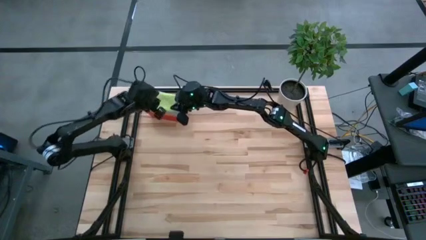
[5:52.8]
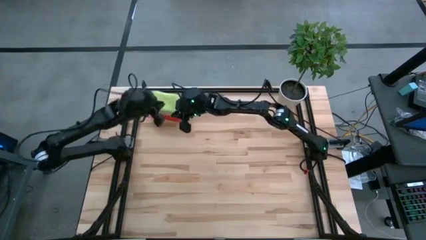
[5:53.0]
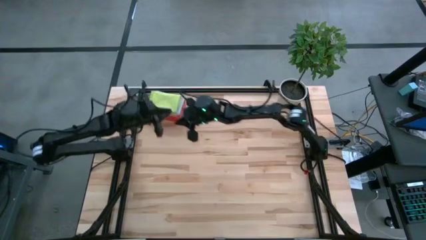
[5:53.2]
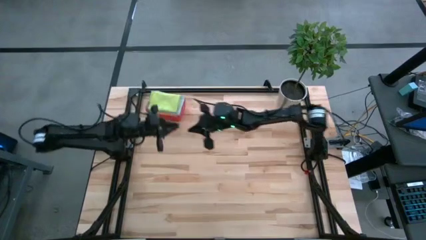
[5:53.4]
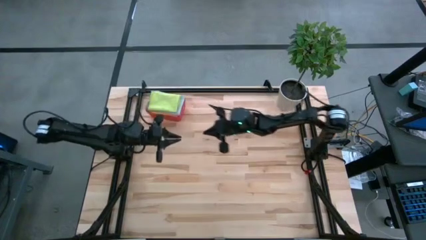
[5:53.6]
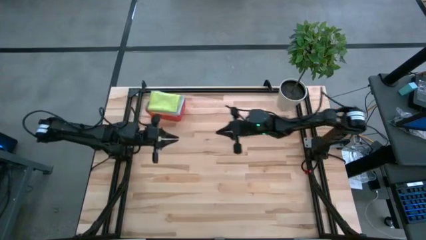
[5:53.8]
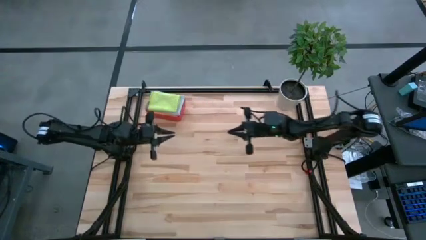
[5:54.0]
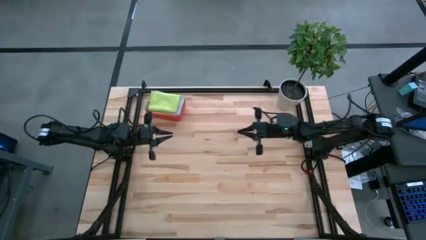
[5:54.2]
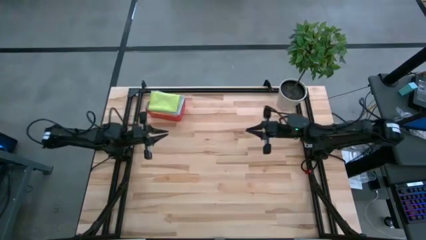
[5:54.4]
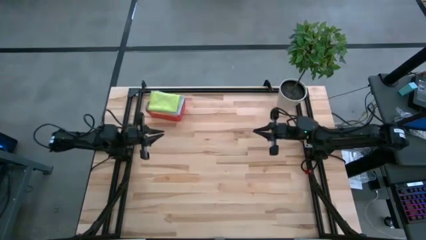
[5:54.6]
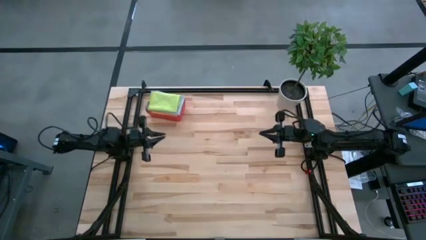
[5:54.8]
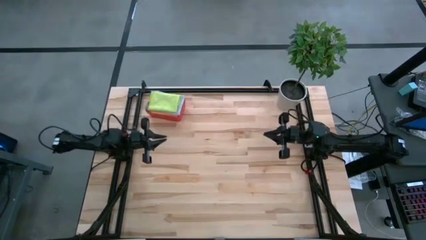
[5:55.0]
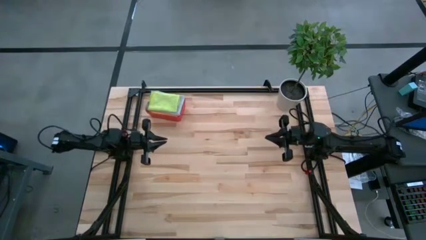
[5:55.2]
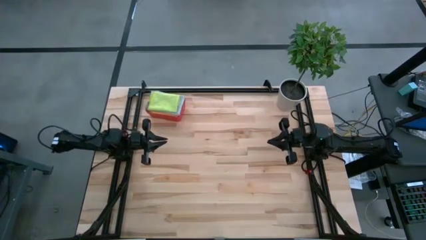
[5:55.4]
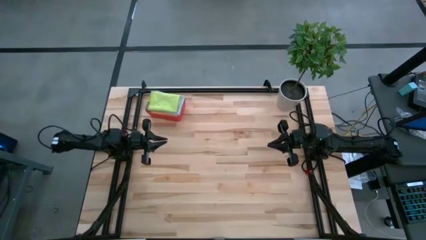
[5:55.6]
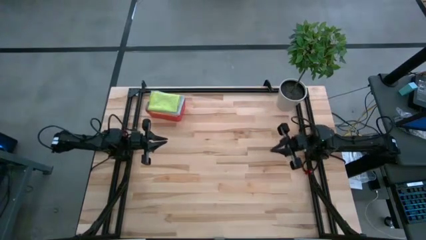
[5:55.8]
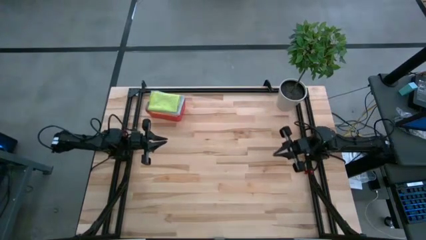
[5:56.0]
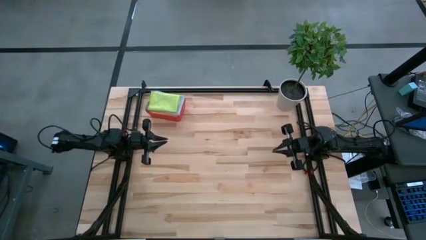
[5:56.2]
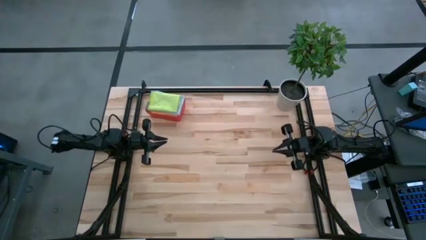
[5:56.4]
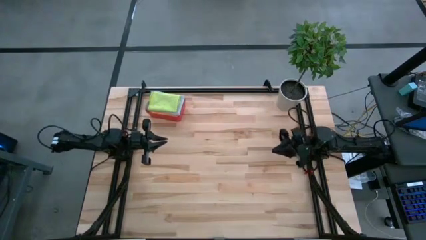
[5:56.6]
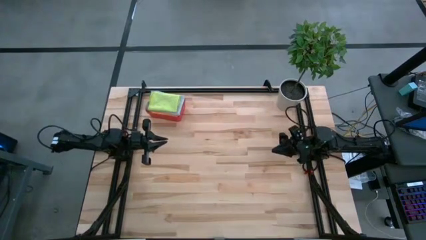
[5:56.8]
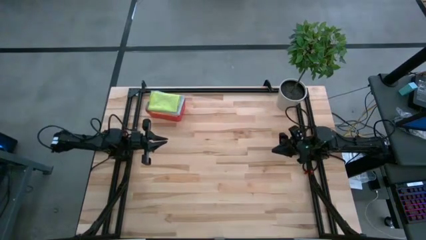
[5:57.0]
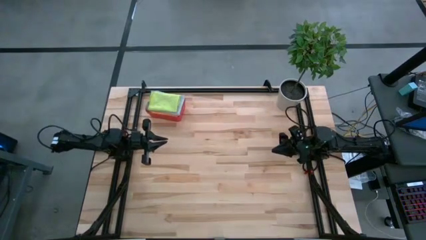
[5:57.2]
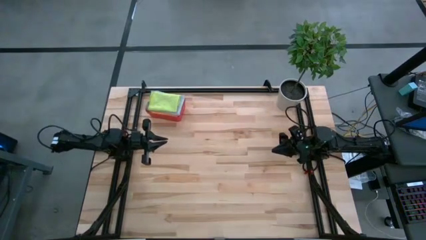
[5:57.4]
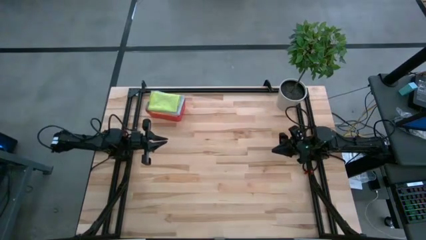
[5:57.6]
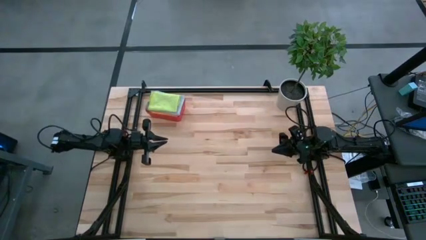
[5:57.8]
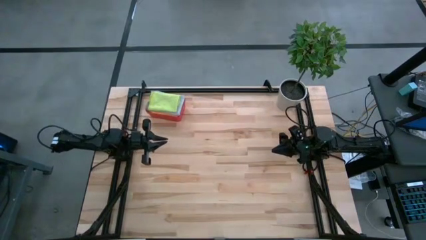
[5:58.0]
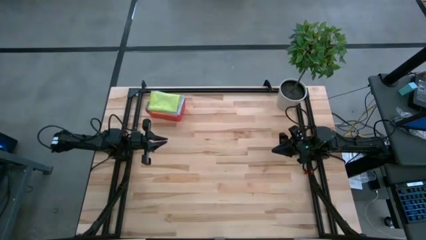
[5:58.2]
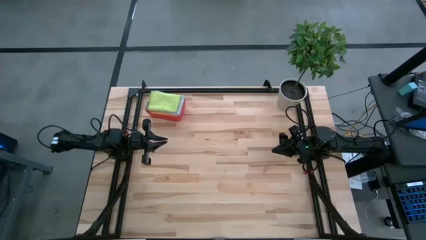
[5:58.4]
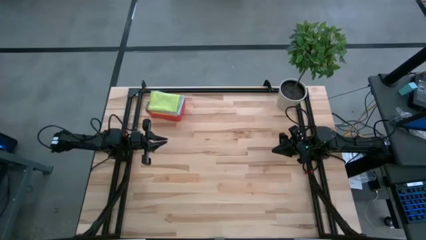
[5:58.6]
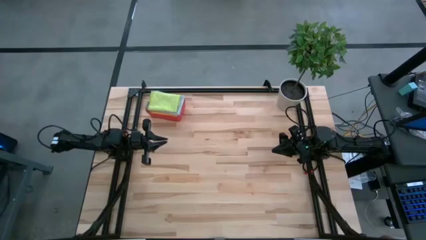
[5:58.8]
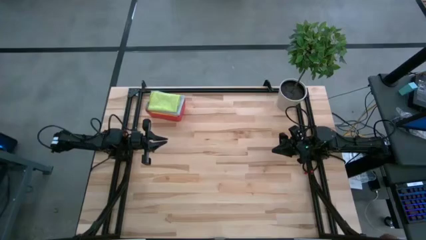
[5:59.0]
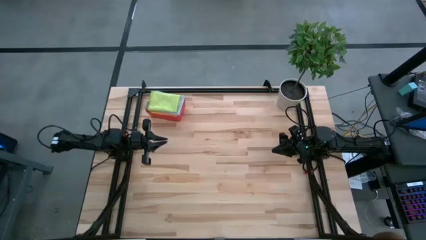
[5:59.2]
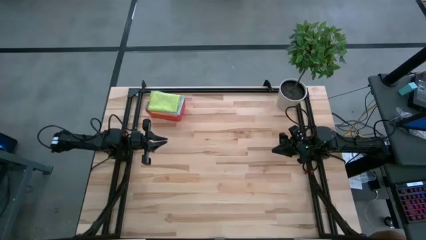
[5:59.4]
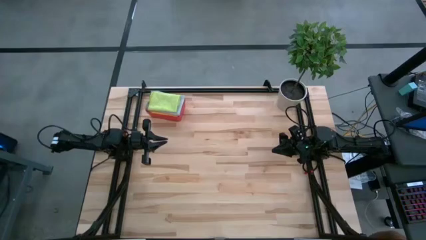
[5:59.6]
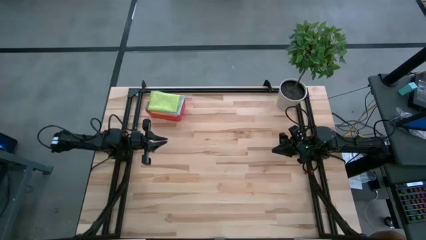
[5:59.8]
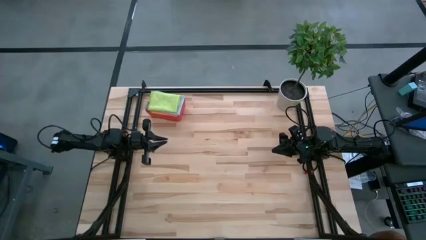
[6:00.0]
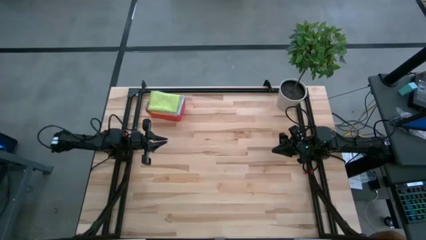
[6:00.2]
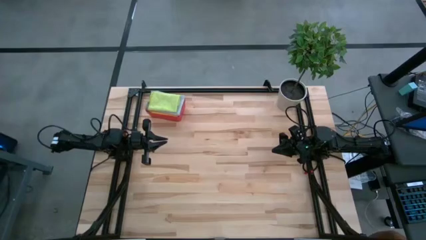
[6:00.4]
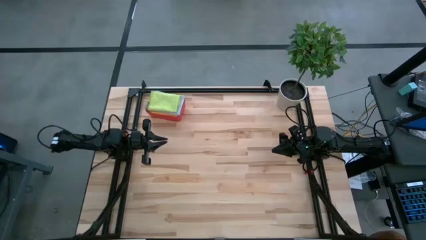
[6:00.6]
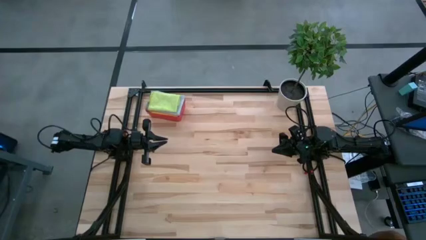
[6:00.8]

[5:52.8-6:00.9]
Task: Fold microfiber towels
Return to Home Position

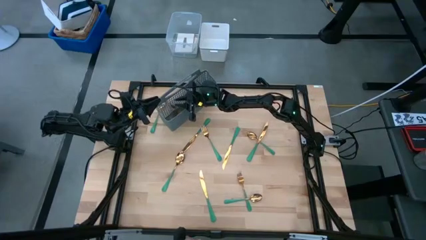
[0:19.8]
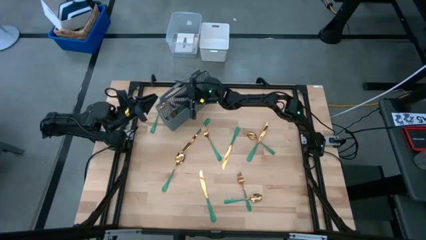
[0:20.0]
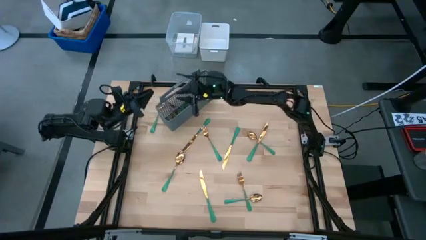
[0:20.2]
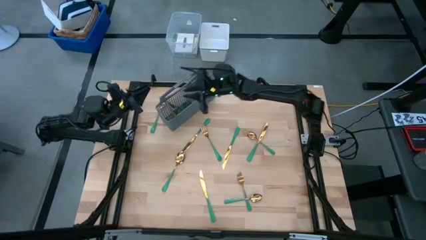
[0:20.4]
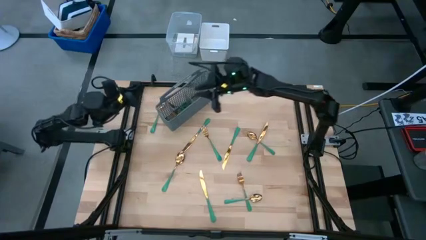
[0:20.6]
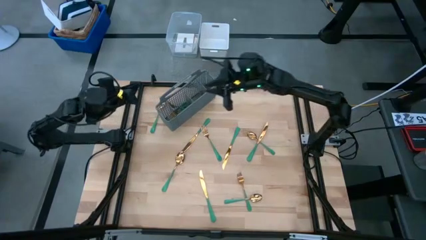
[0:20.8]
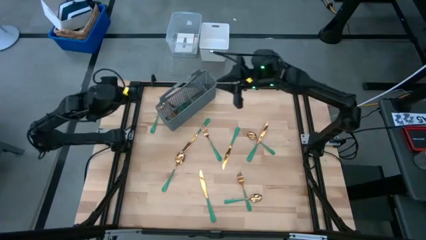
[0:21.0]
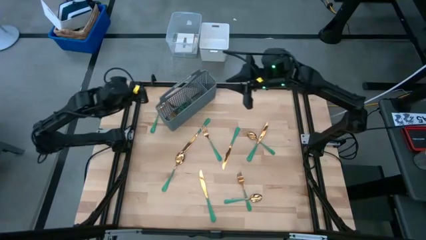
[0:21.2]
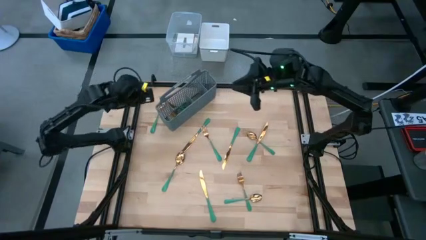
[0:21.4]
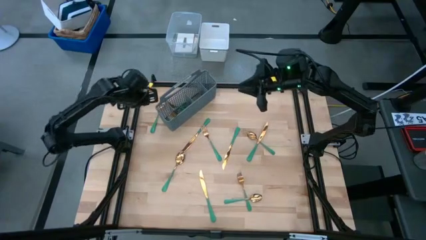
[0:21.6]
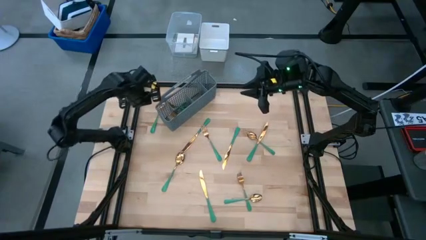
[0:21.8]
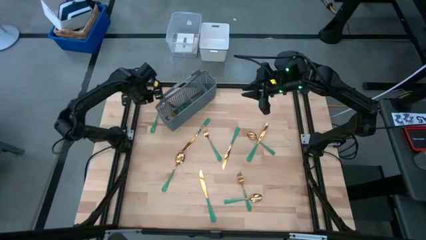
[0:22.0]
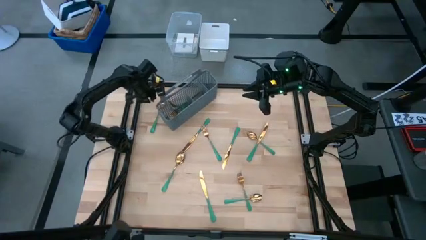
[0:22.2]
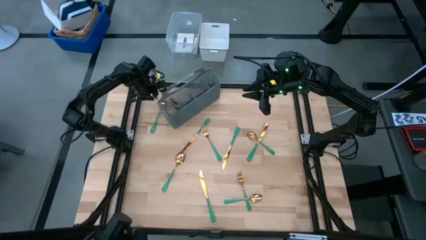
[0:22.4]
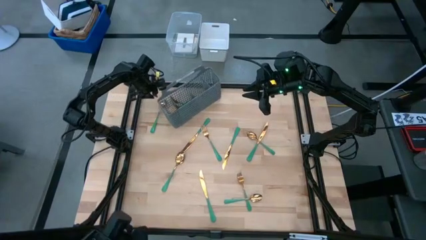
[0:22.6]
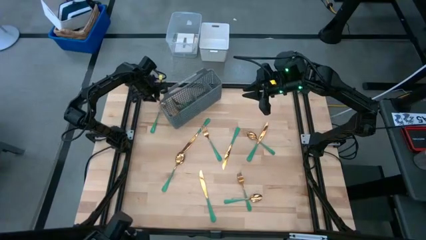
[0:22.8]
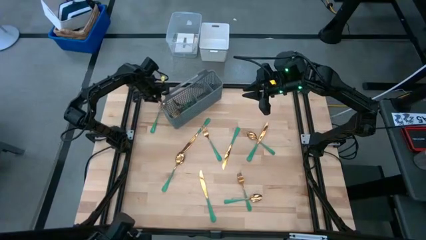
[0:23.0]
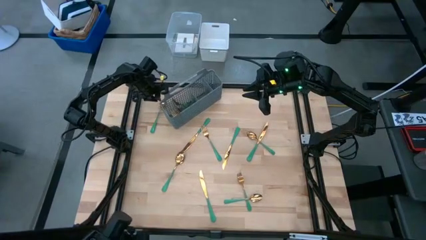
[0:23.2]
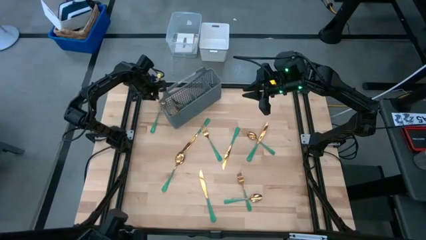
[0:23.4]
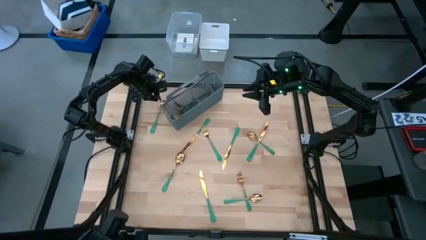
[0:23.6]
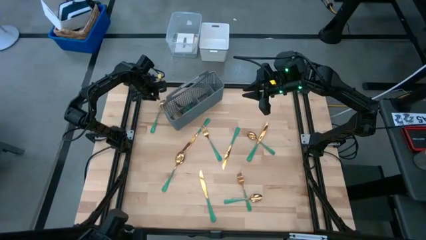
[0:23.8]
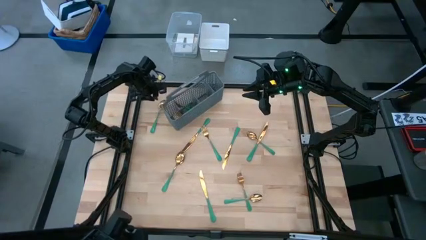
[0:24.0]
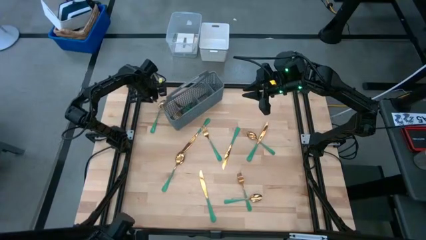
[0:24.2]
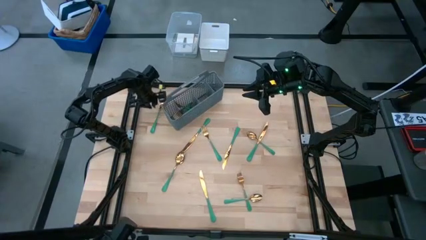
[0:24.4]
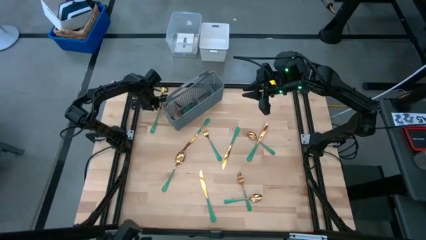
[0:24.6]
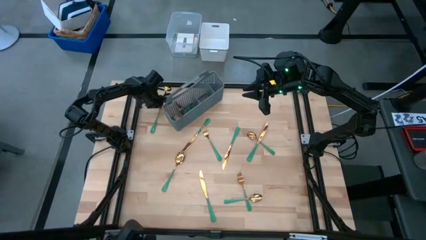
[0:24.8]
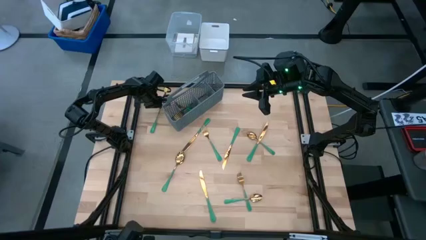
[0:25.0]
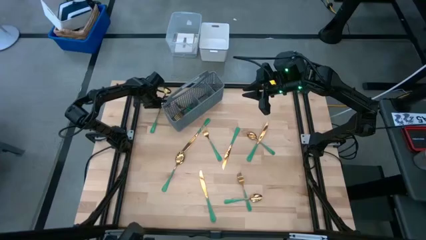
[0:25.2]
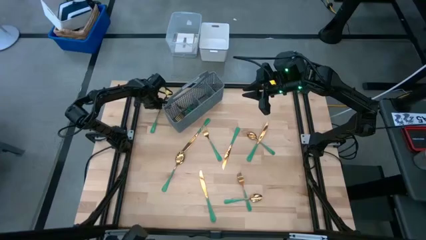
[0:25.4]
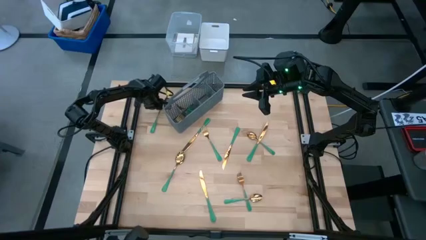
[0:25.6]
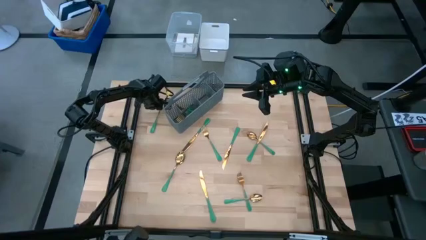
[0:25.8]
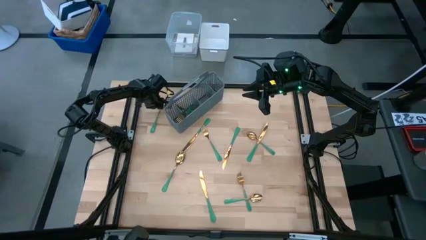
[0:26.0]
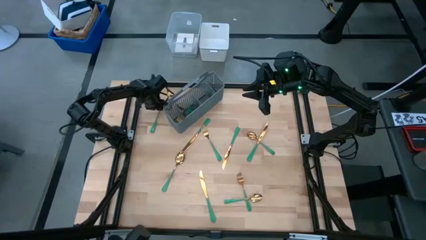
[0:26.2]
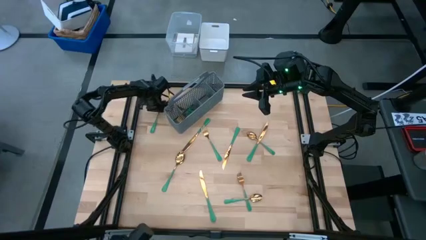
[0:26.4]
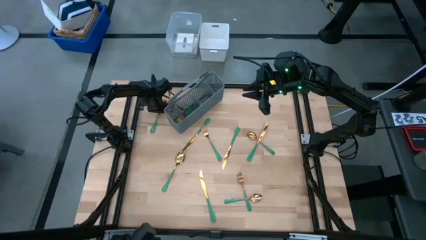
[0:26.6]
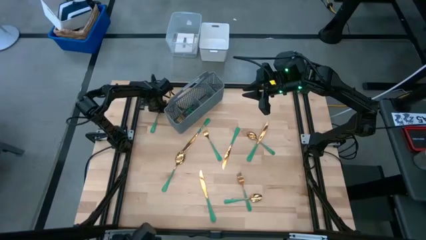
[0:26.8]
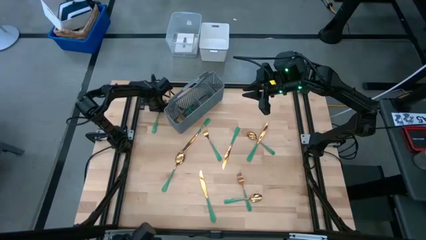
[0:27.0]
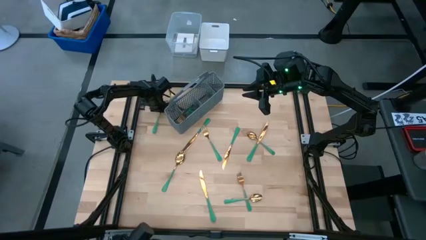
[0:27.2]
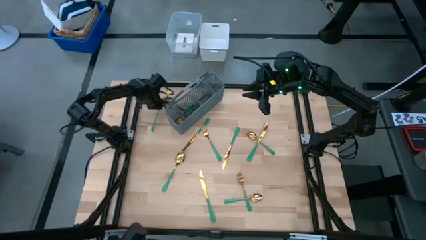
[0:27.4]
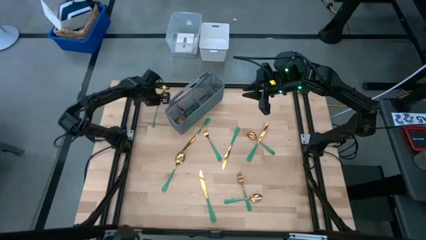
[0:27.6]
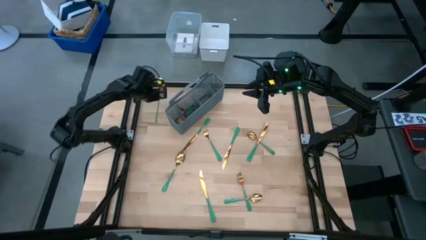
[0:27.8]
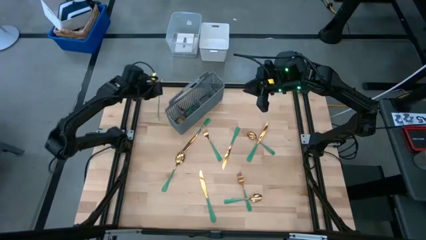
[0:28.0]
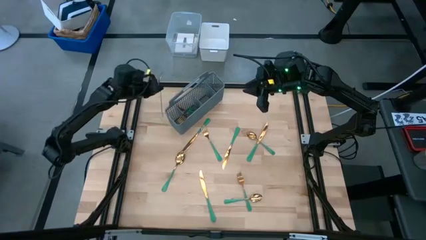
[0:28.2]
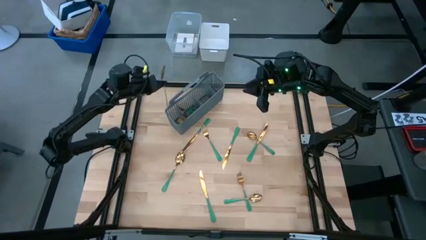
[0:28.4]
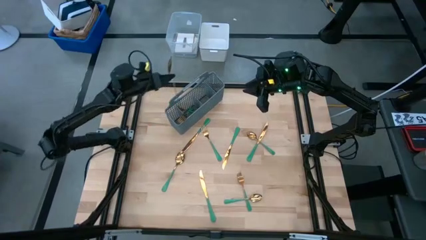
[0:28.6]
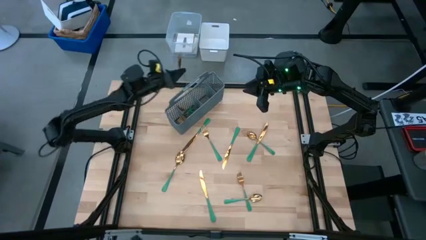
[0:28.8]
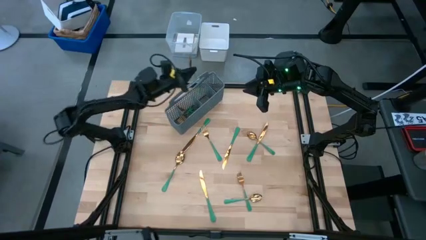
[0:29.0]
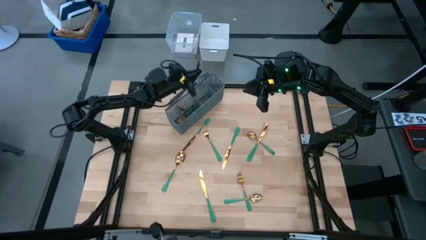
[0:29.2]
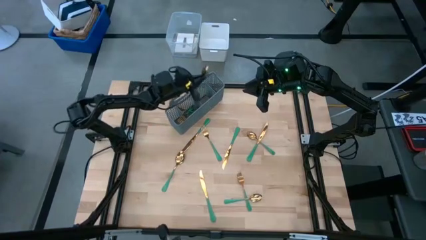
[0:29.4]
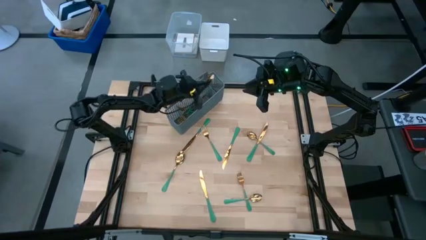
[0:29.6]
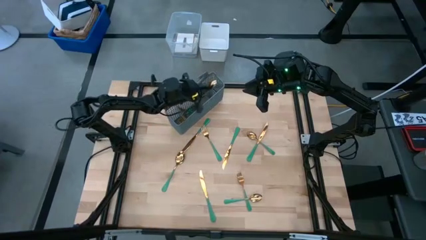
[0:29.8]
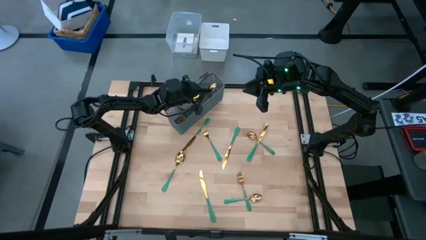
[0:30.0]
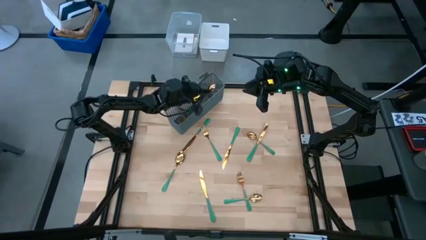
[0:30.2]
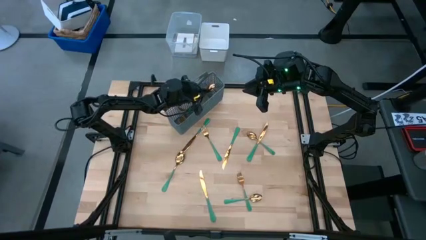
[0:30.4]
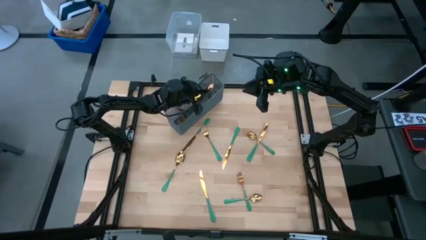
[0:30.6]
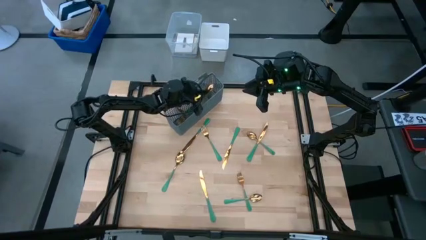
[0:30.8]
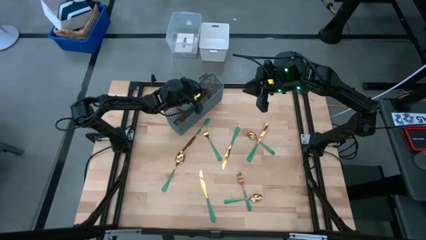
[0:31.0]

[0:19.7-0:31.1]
Task: Sort silverware
Put the top left green-gold spoon into the silverware basket
